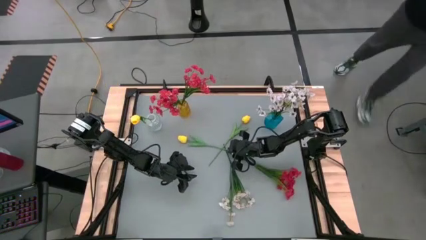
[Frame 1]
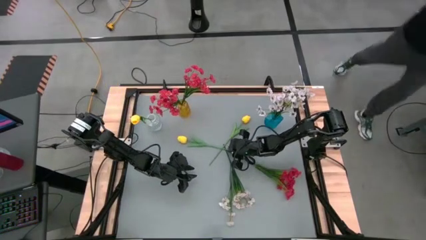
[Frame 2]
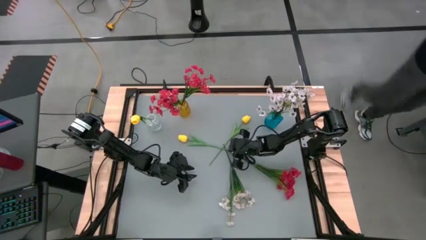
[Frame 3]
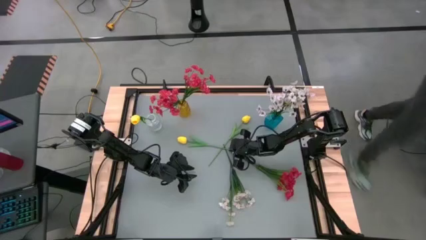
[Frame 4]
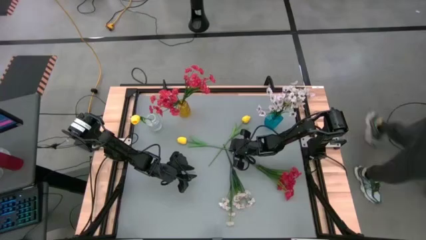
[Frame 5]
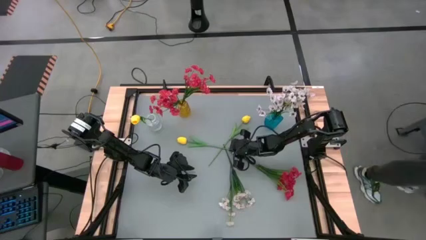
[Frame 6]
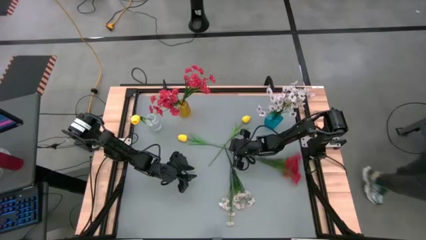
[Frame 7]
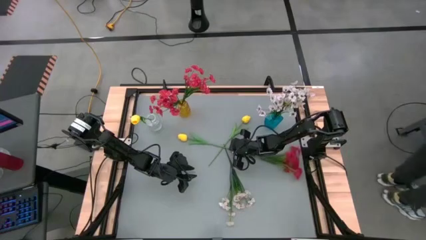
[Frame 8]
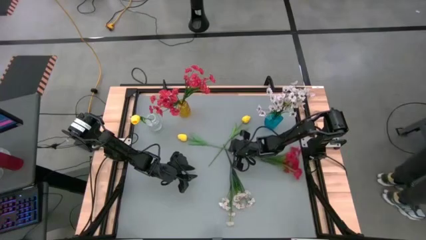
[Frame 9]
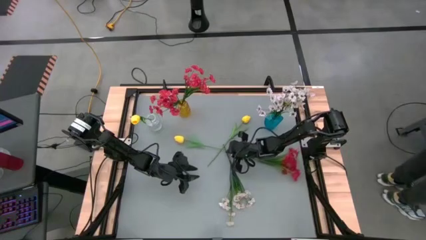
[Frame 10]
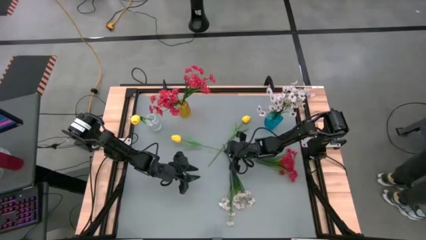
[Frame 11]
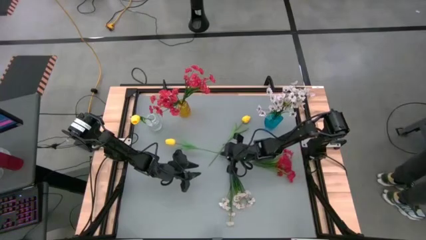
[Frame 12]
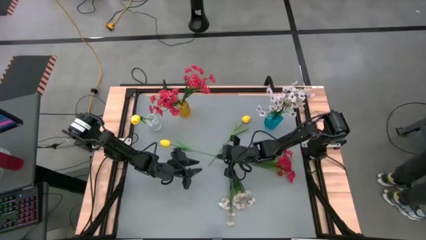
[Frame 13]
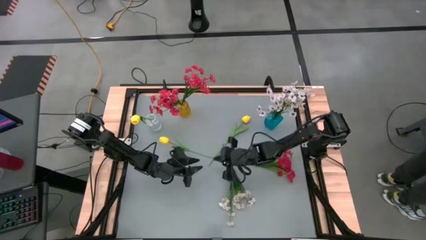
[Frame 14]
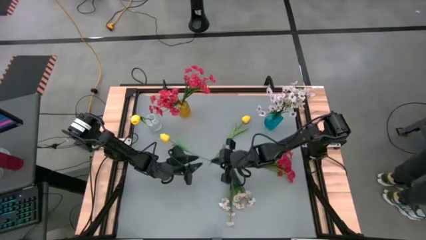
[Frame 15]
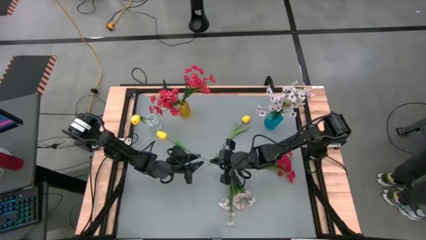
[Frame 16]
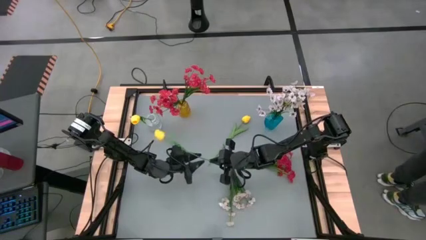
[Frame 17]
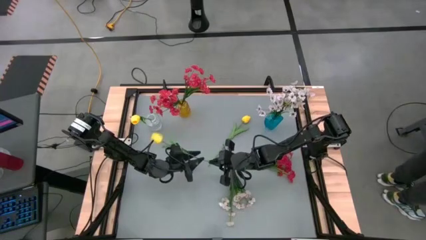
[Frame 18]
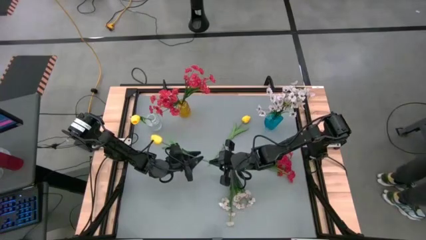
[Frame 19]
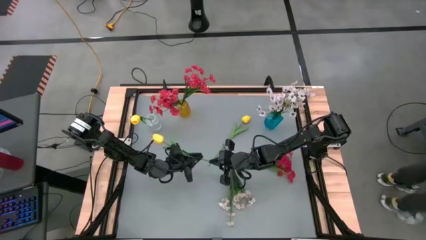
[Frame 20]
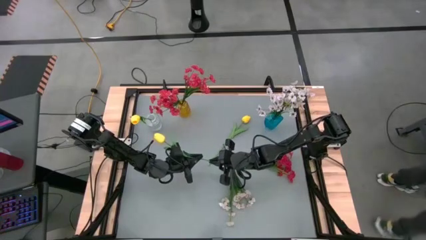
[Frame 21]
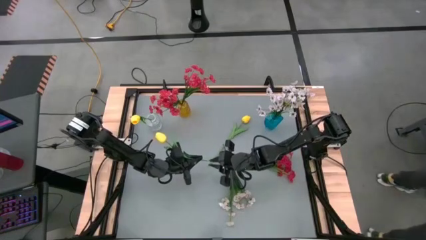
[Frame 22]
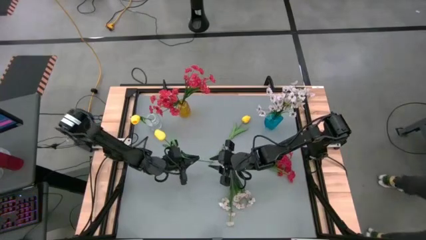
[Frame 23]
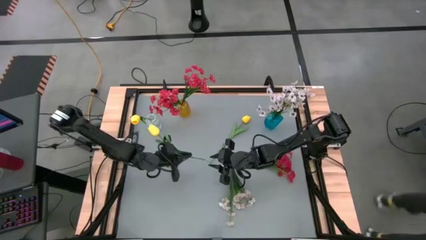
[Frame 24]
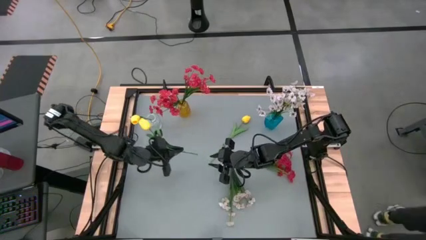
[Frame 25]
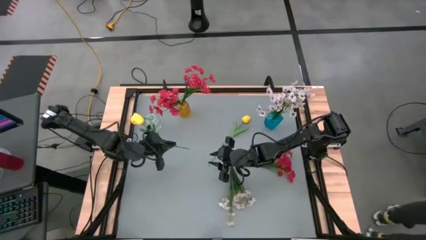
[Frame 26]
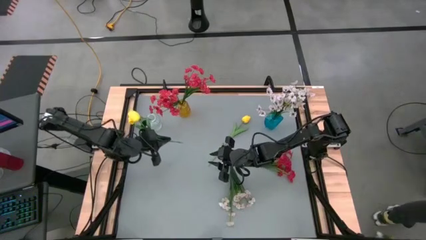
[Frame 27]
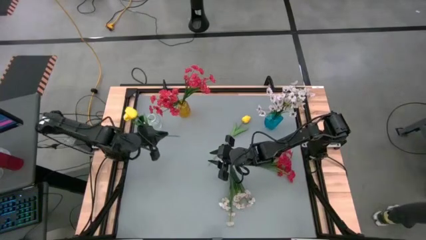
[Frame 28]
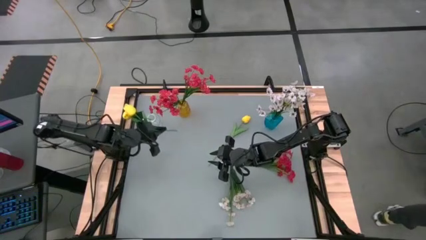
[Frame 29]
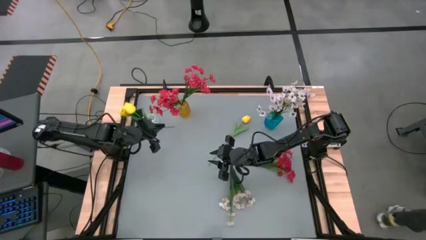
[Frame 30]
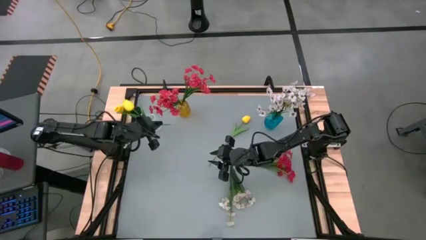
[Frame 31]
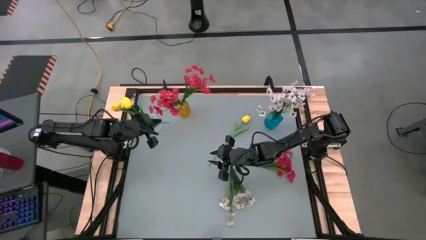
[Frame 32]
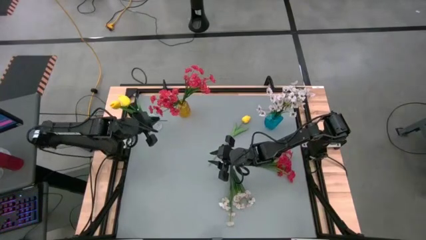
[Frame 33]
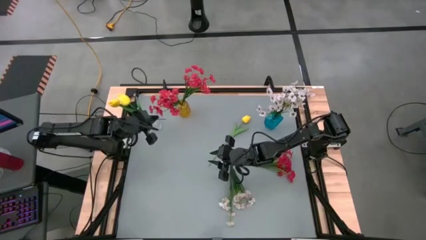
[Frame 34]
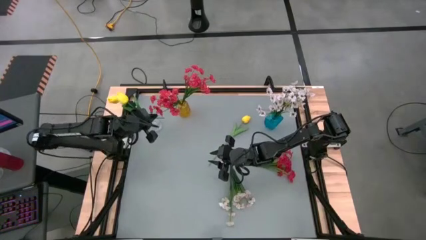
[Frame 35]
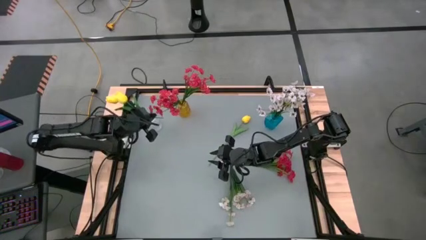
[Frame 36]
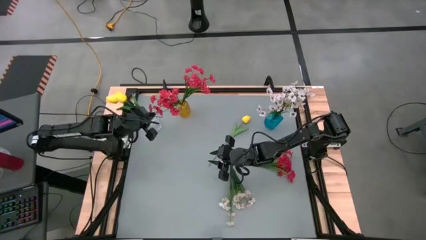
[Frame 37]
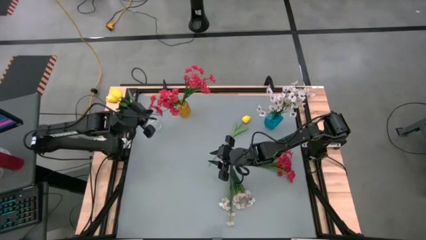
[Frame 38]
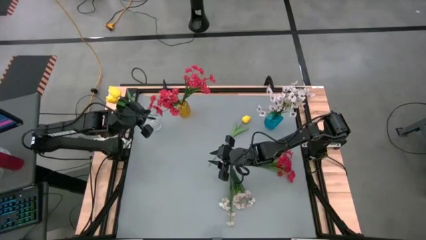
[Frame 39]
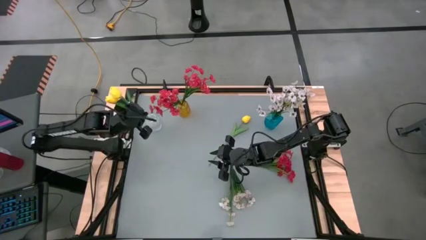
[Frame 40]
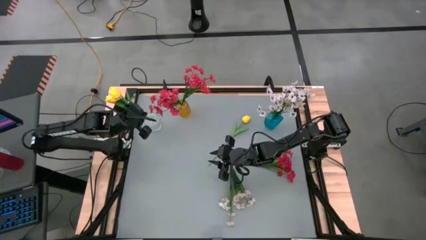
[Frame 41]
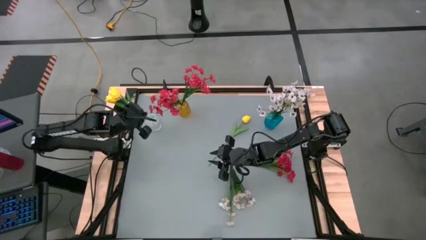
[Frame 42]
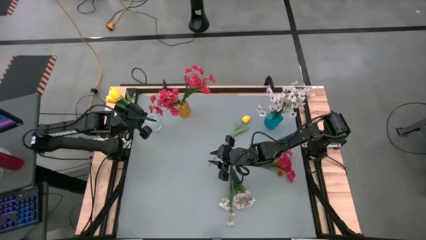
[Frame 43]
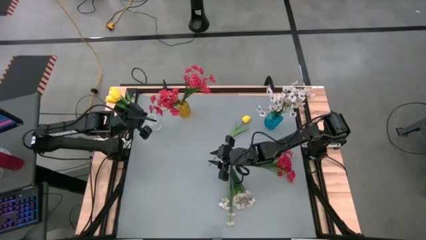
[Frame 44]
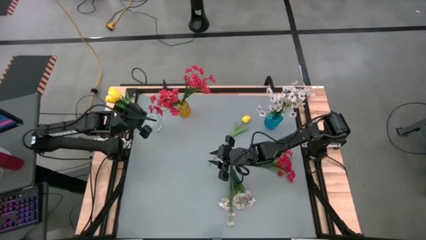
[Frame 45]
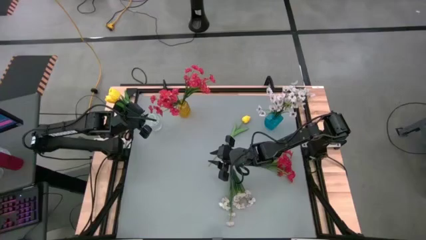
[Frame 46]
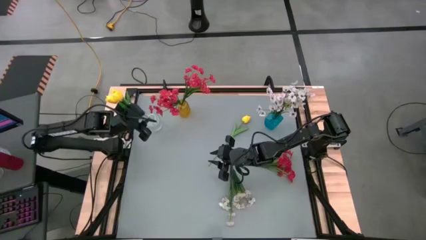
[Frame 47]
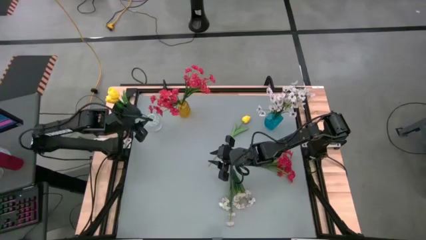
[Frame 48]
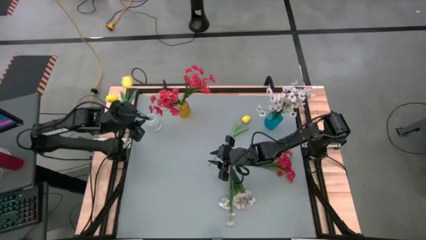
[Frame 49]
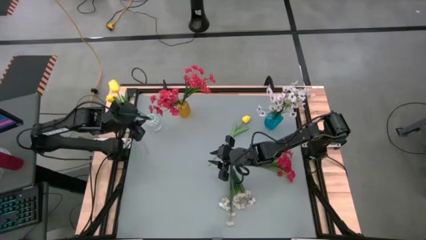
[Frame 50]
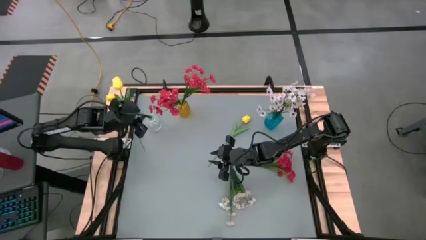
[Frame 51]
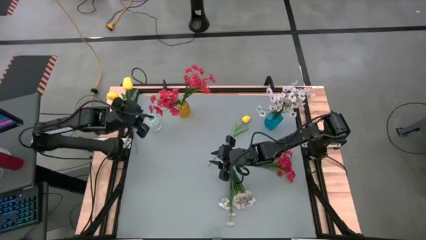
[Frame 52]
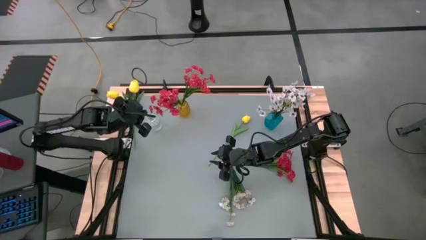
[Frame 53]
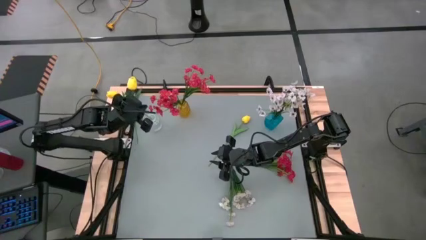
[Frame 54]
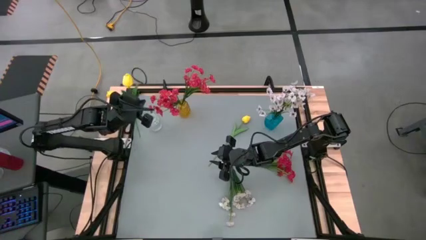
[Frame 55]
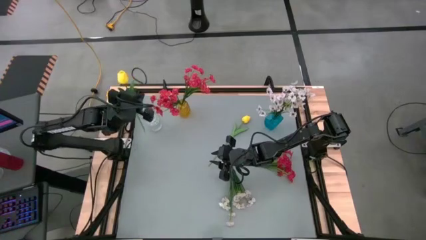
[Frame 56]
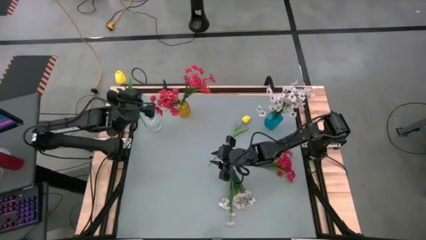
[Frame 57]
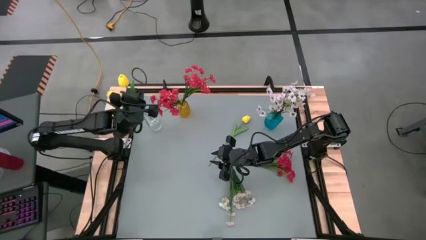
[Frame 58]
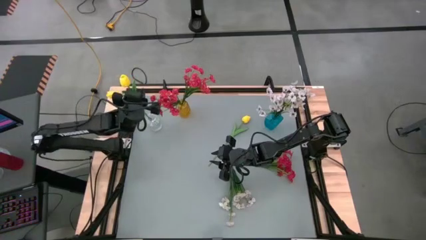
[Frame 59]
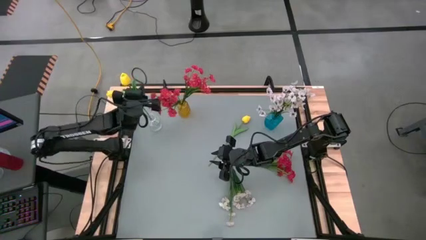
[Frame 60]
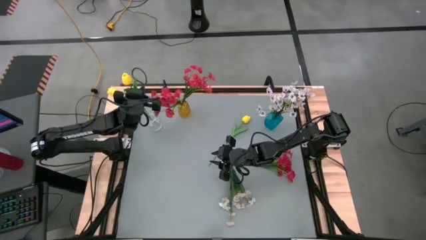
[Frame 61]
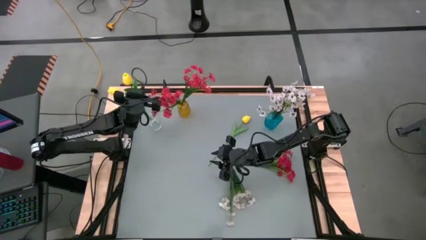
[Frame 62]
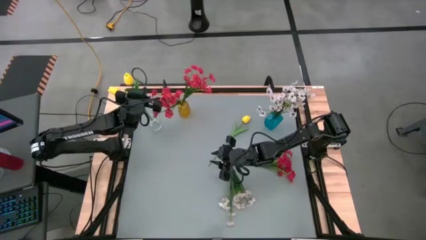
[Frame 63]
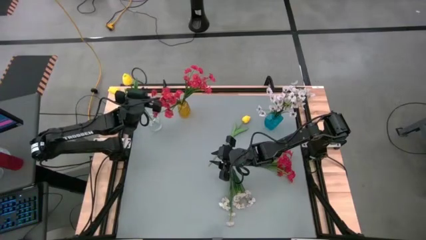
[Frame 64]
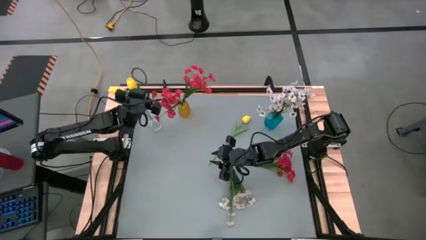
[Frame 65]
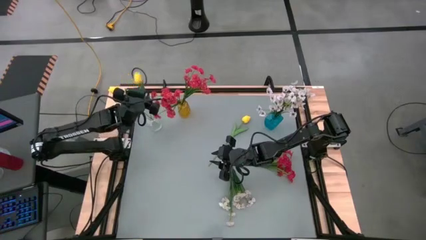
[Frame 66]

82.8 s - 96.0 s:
Task: Sort flowers into vase by color
Put the bottom yellow tulip into the transparent vase

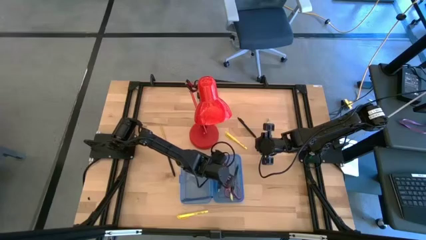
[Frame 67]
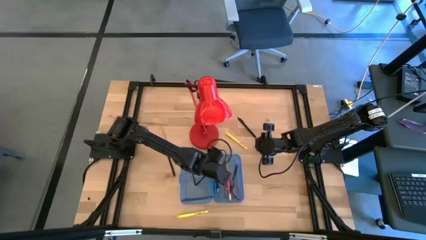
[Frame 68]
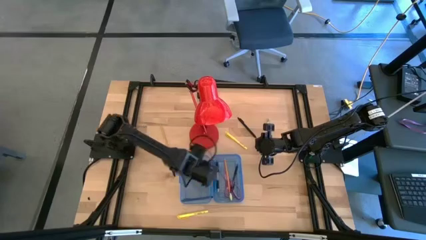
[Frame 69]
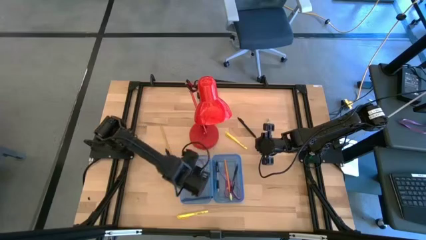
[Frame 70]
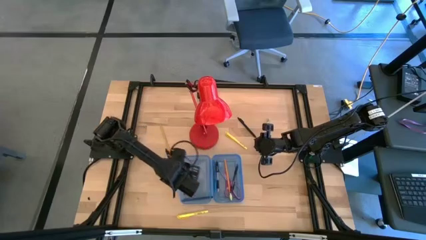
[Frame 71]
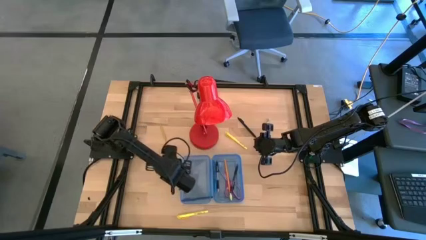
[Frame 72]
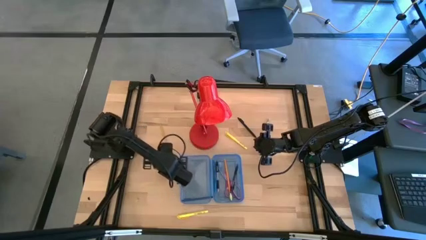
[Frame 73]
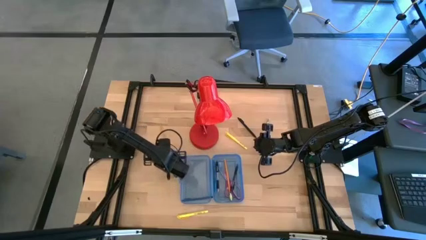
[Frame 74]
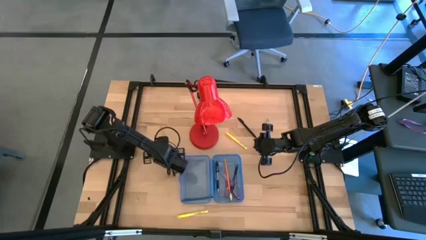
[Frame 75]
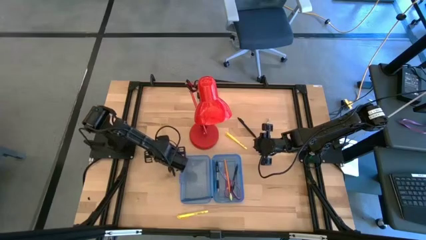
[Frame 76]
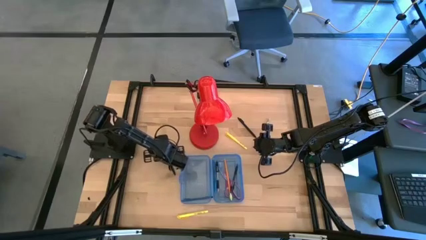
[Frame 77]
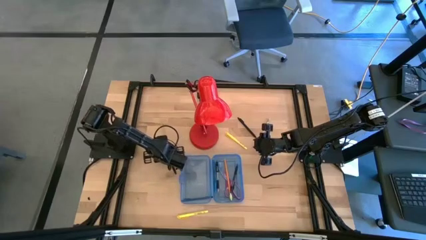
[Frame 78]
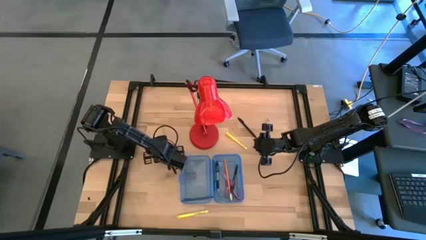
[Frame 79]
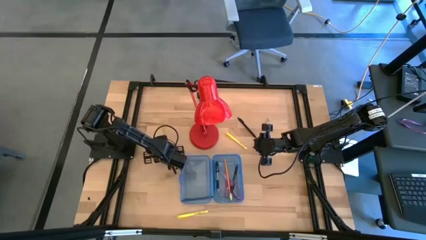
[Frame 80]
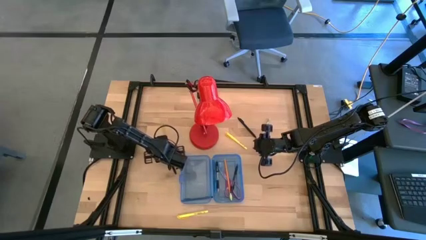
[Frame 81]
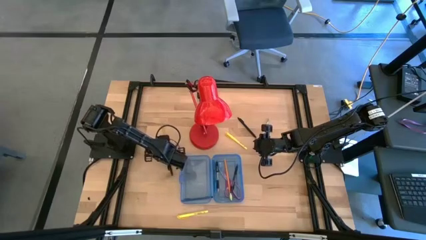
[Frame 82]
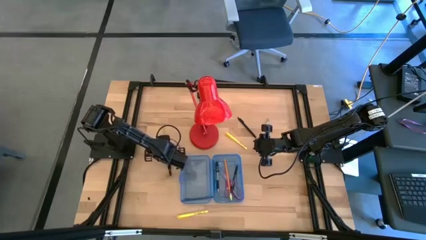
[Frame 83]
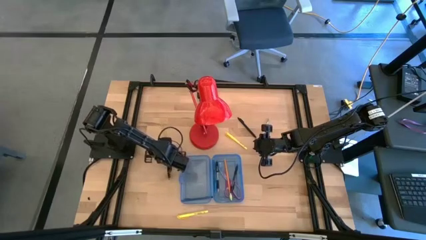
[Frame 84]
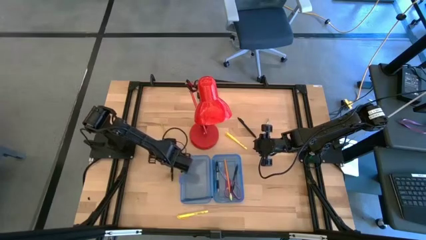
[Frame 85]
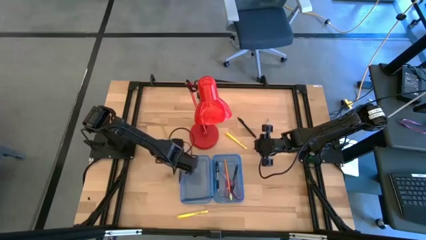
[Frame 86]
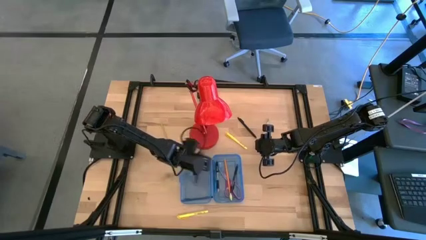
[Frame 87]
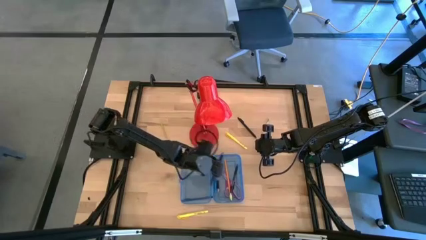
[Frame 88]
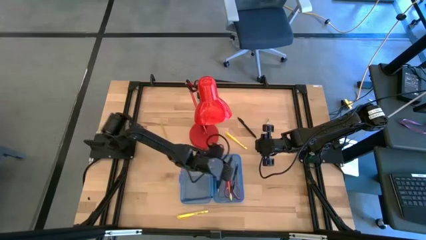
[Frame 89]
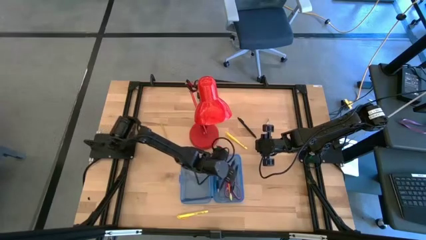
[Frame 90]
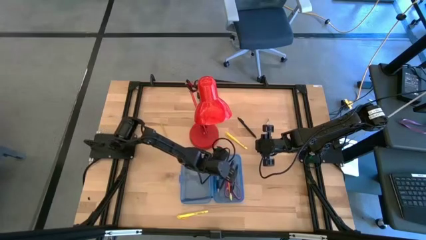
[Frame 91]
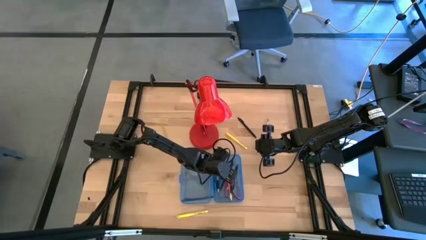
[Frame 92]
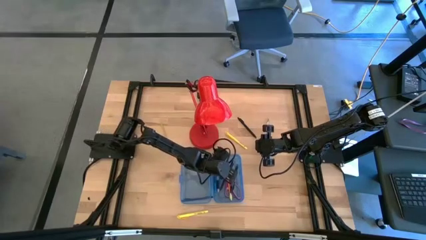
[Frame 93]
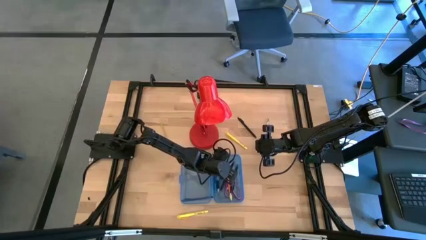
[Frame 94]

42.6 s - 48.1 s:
Task: Pick & place school supplies into a supply box
Put the middle left black pen into the blue supply box
